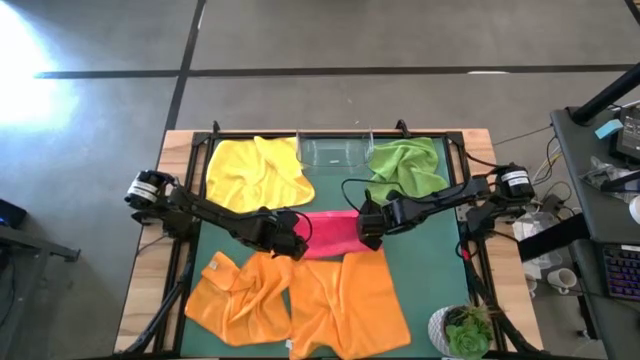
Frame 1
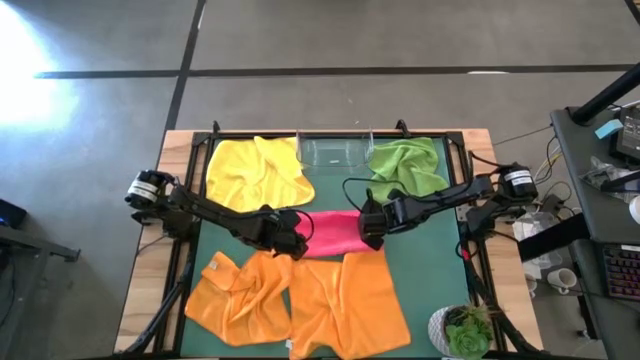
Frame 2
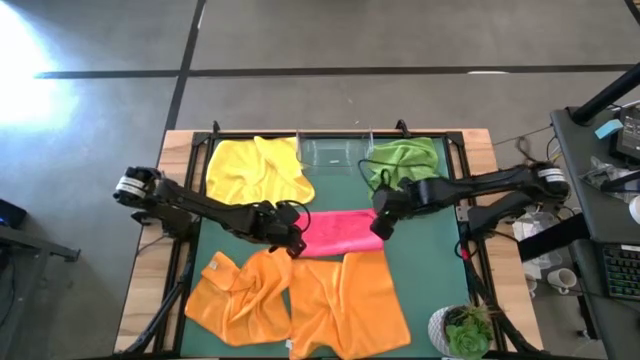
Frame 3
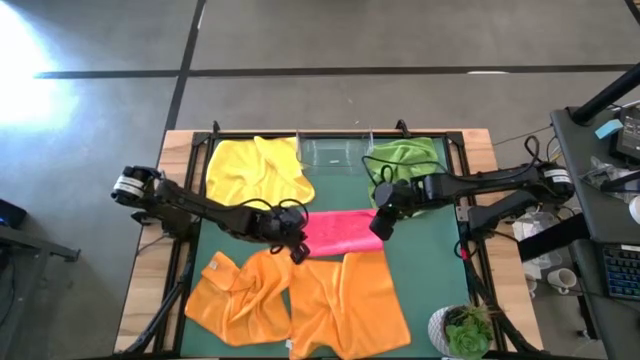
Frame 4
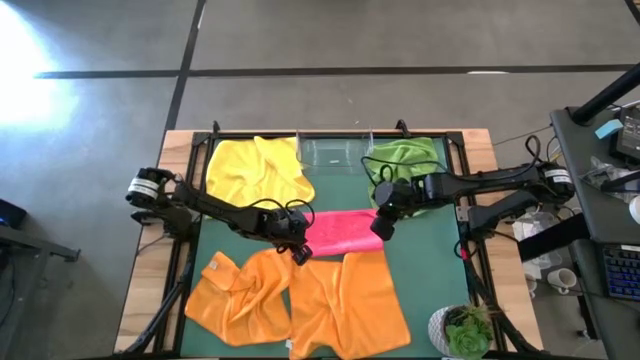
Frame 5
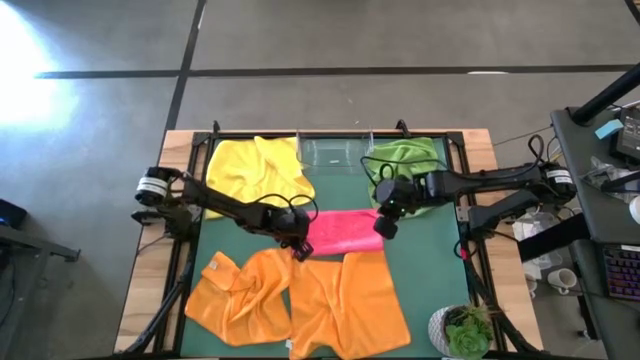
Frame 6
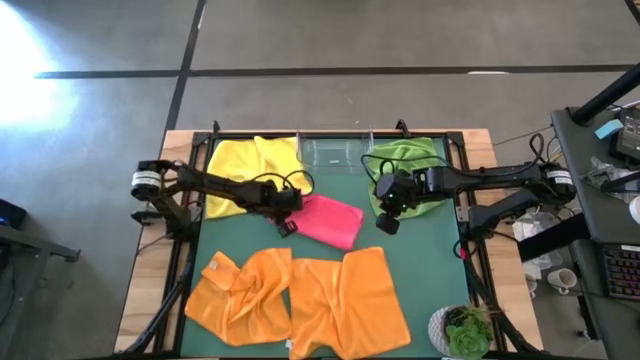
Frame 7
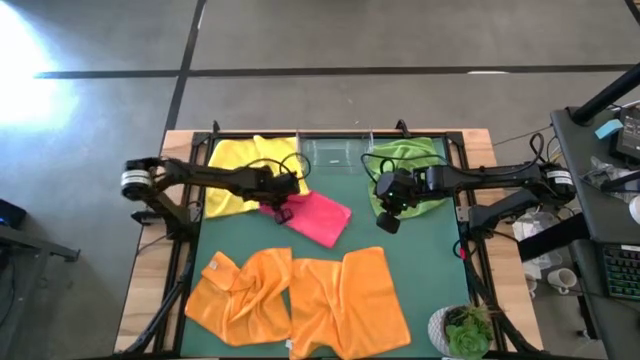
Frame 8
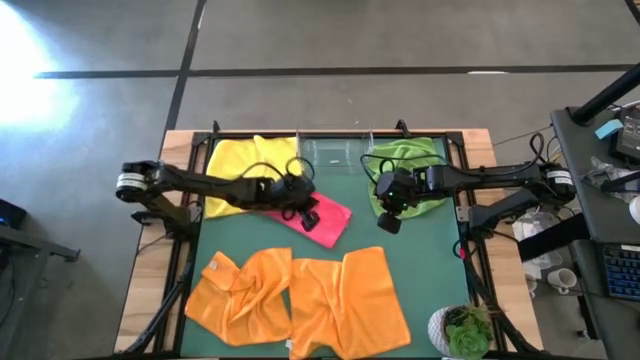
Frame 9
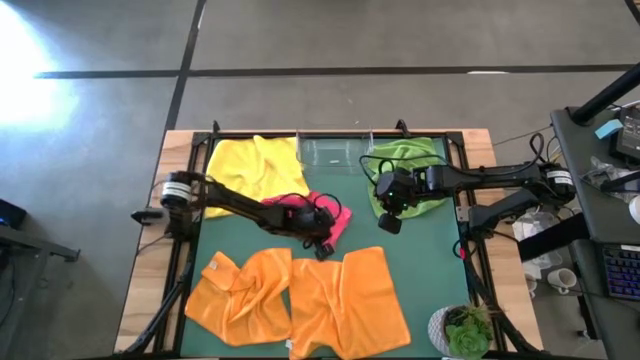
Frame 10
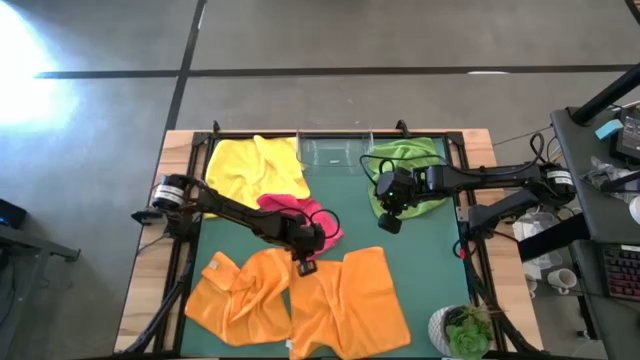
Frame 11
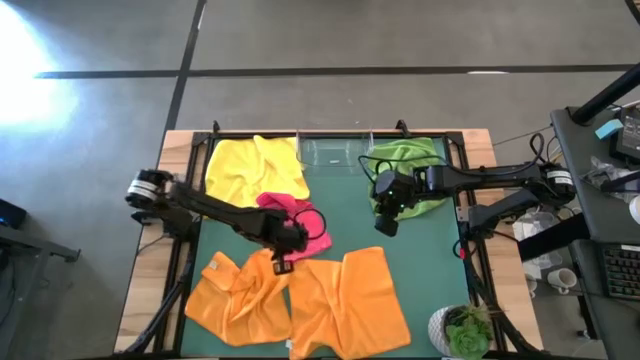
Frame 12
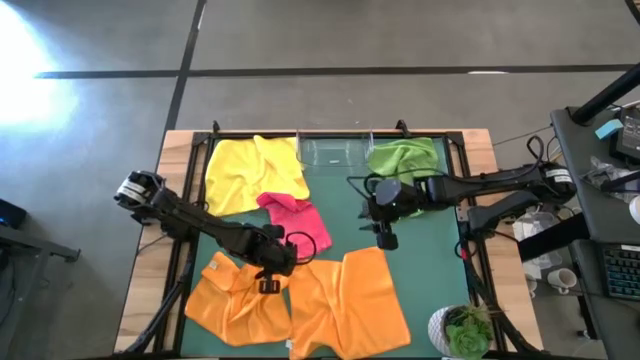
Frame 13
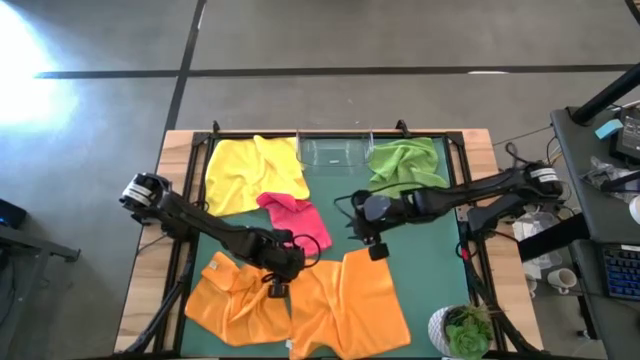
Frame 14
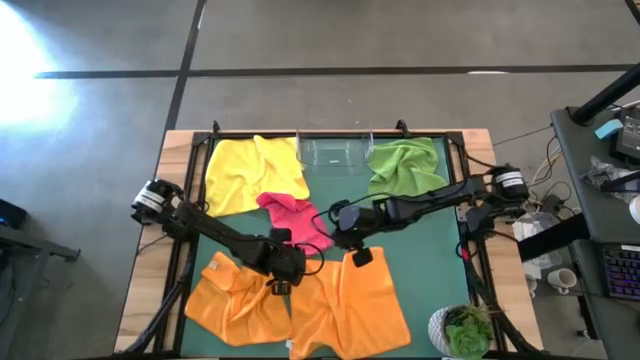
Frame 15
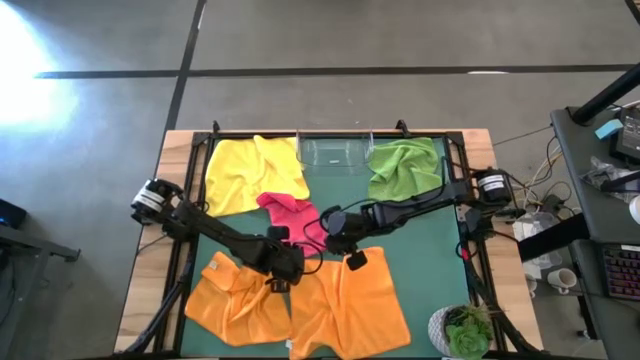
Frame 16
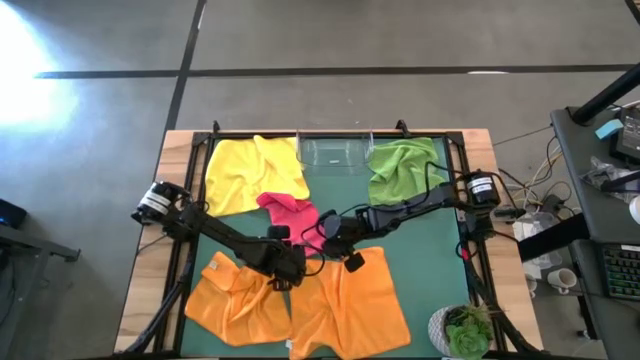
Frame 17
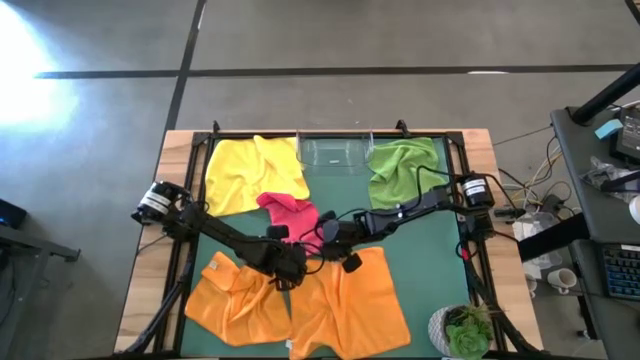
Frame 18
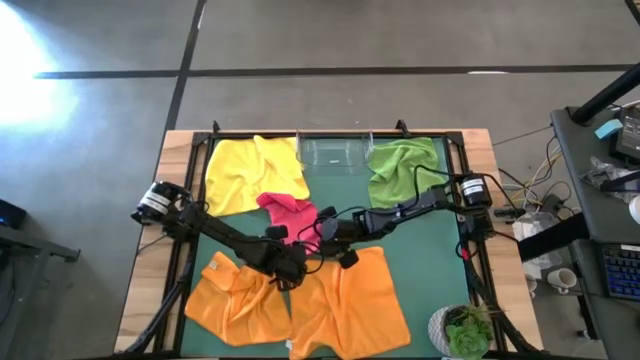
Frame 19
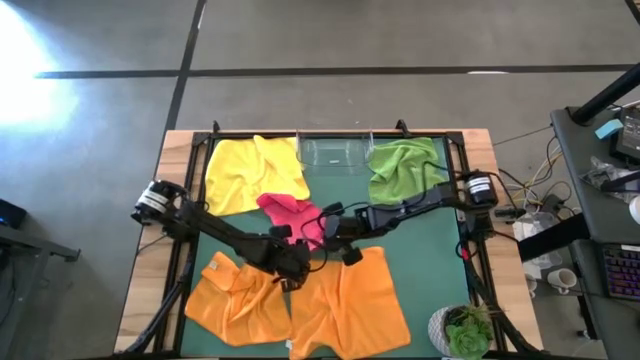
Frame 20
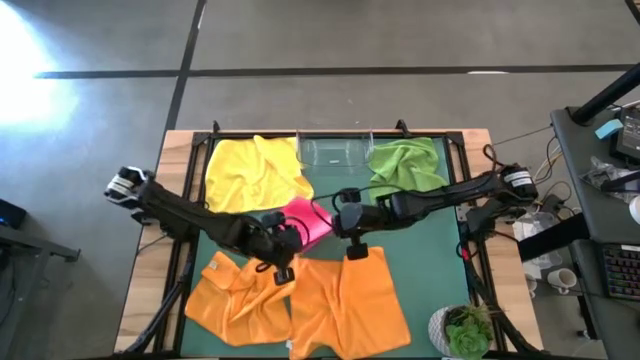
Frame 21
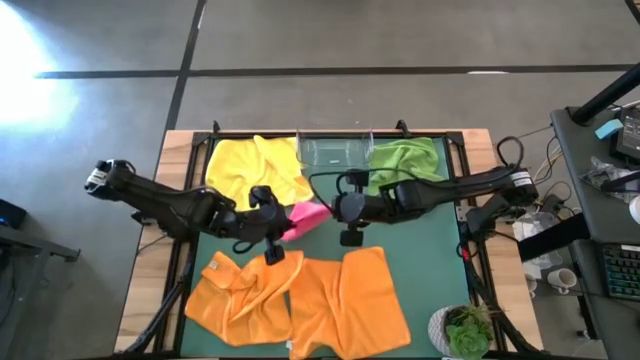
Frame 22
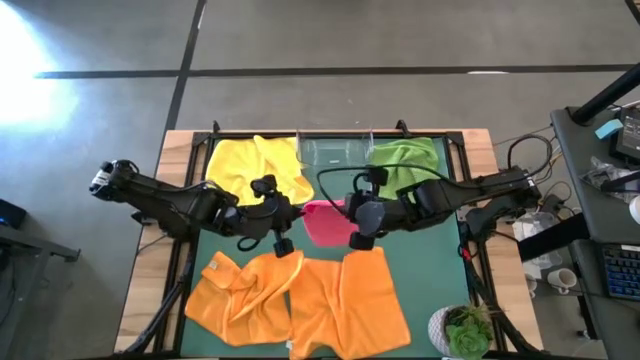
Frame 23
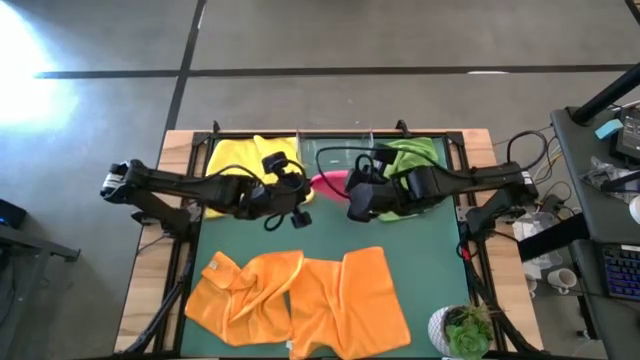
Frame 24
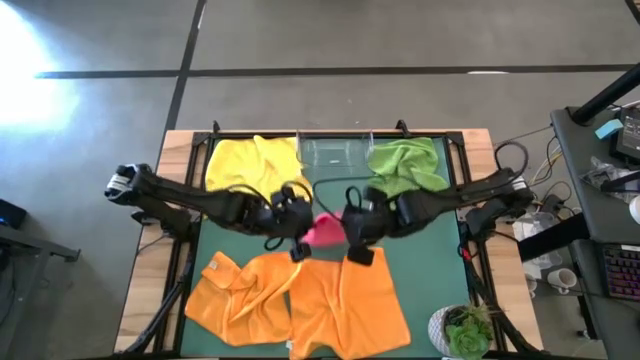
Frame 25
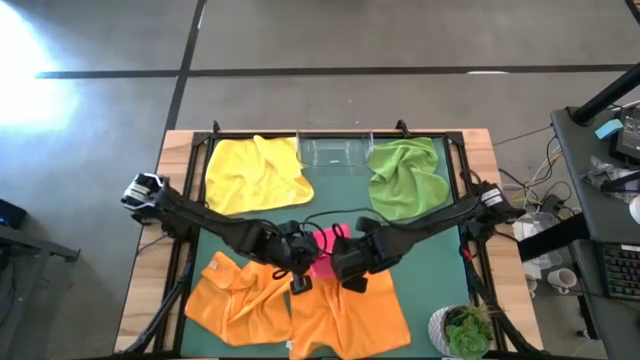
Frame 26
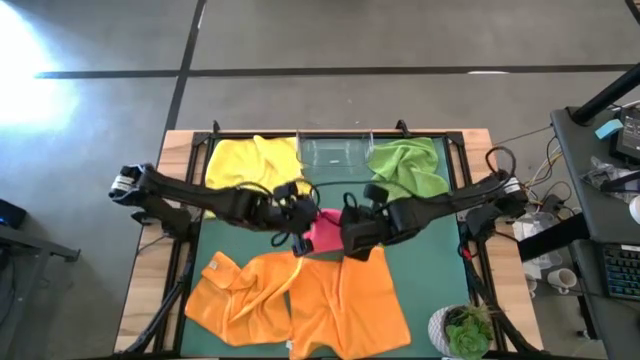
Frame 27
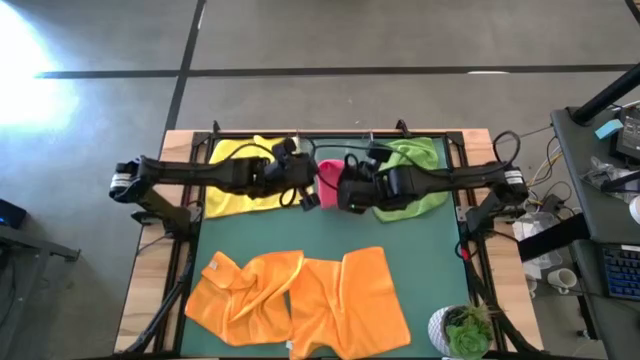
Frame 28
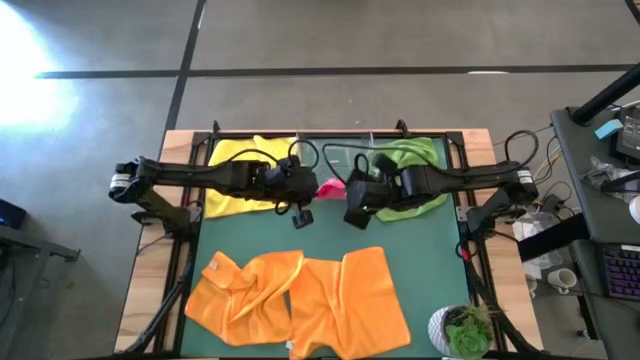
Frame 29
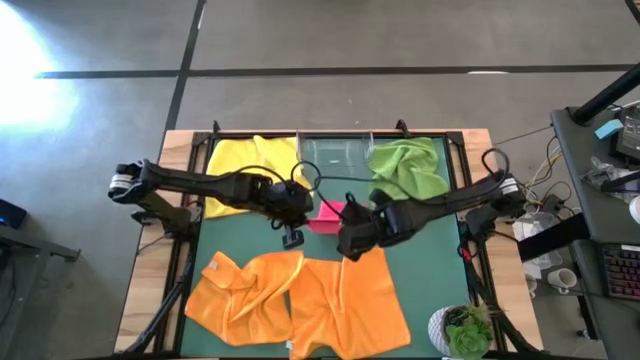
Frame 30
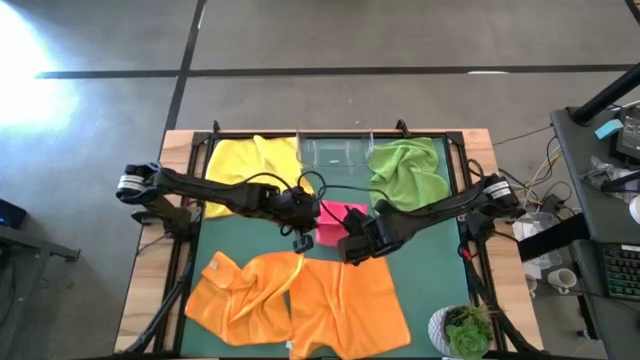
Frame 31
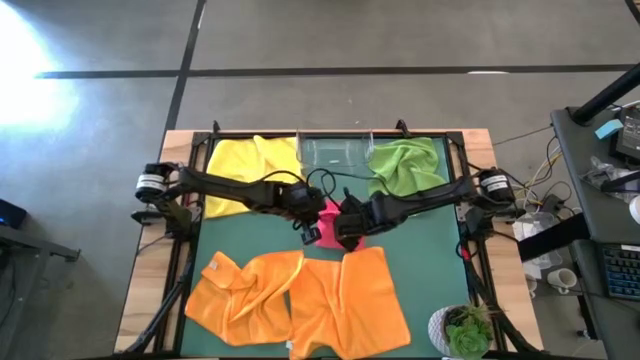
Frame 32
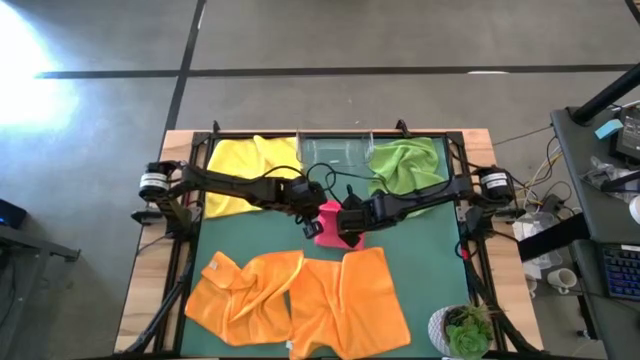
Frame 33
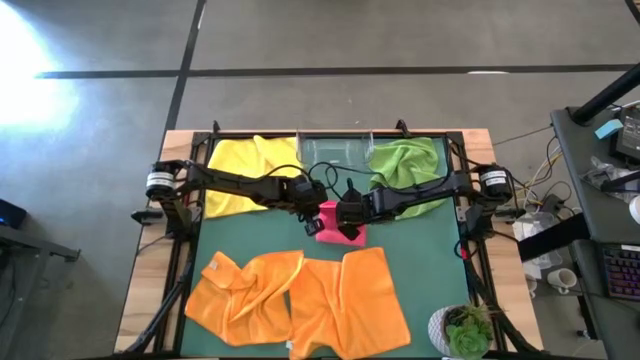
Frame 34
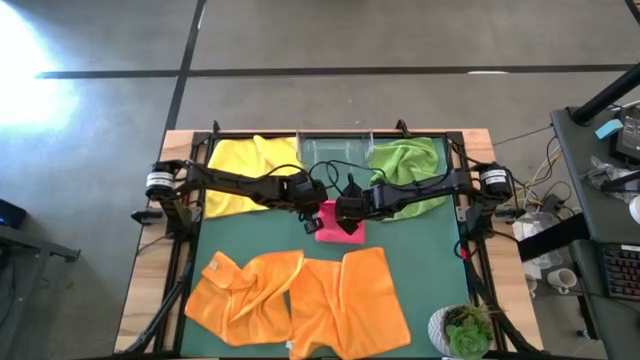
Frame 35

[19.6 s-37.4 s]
Task: Fold microfiber towels
Fold the pink microfiber towel
